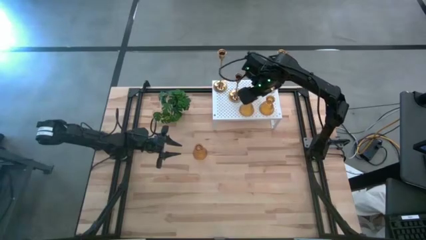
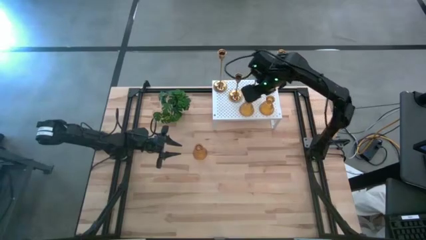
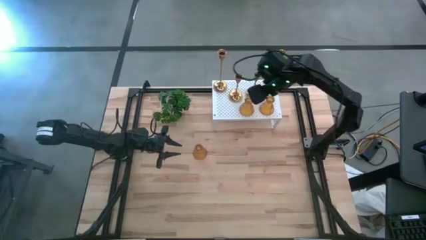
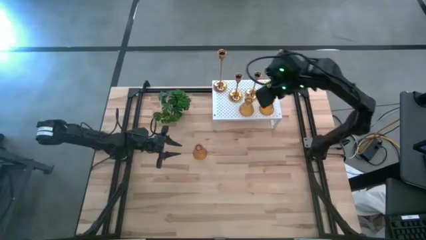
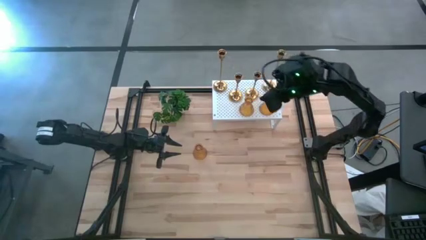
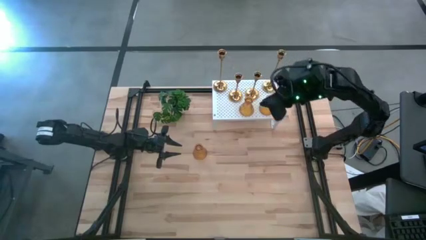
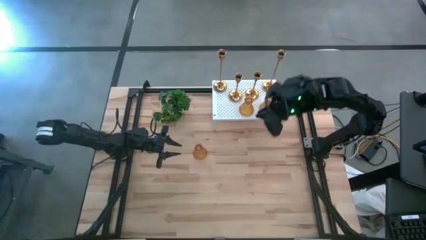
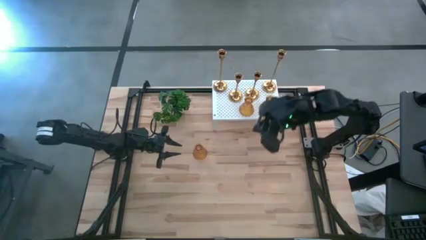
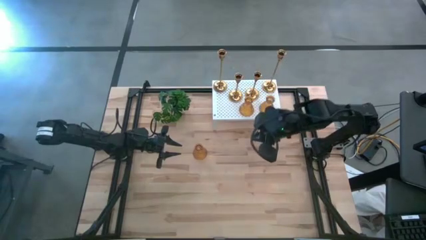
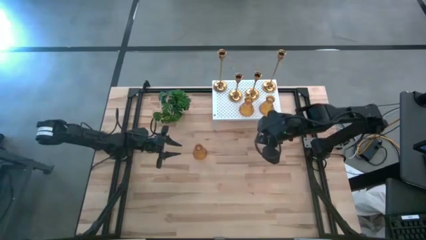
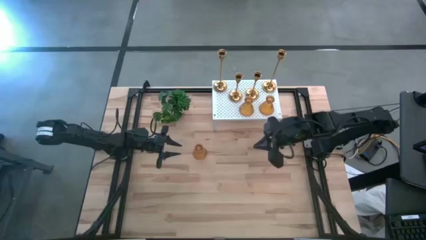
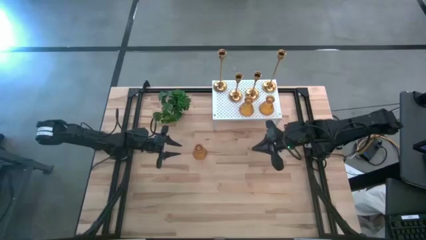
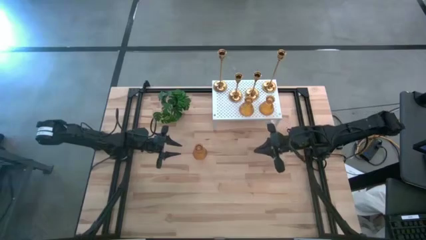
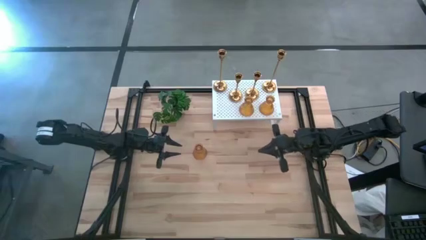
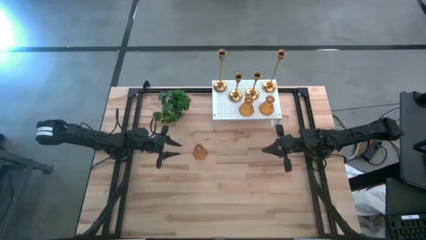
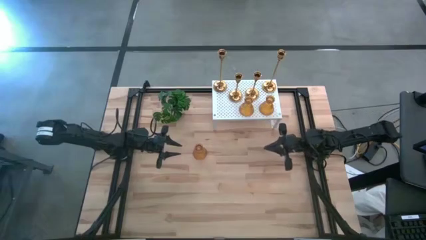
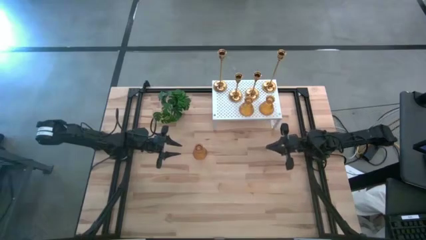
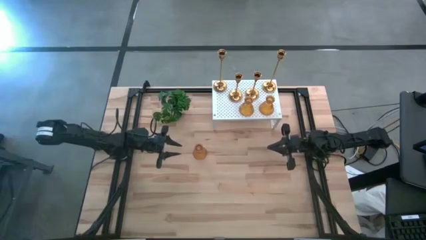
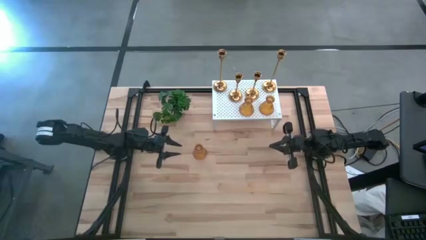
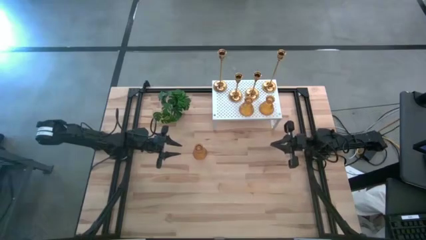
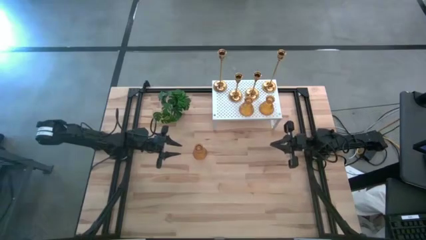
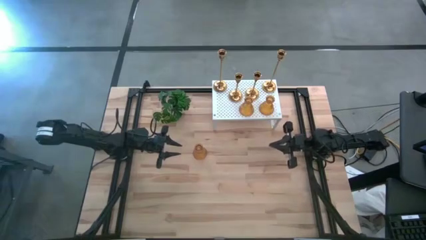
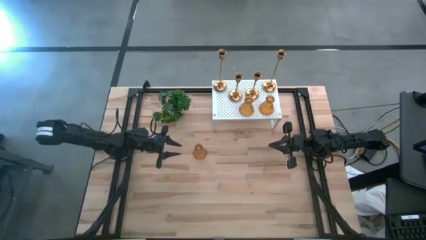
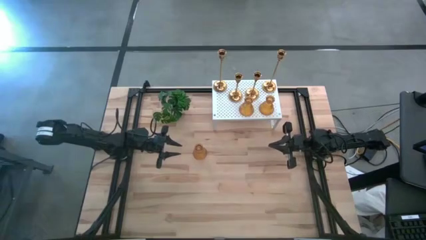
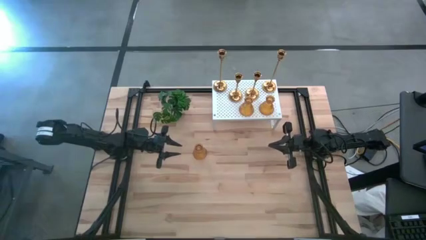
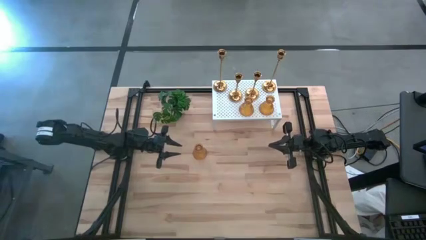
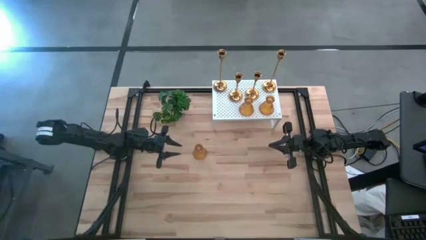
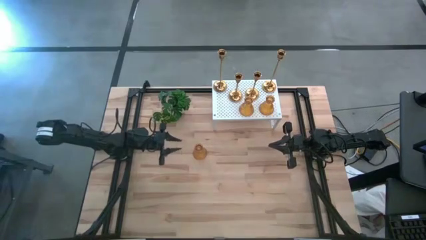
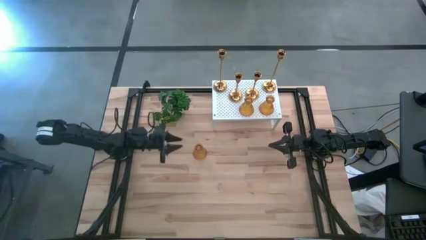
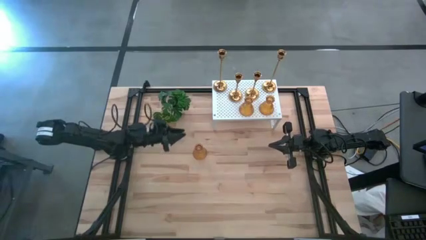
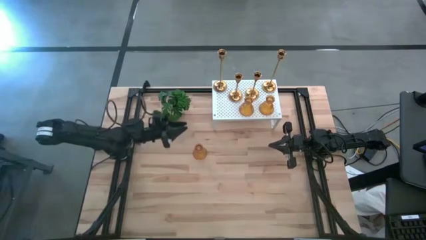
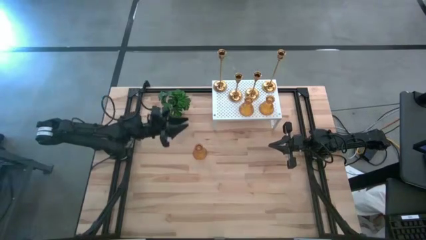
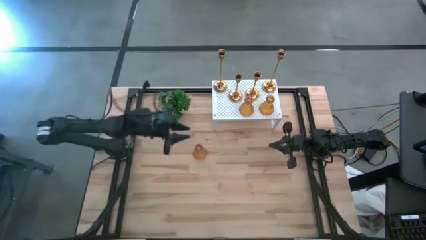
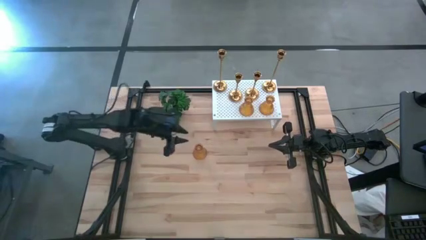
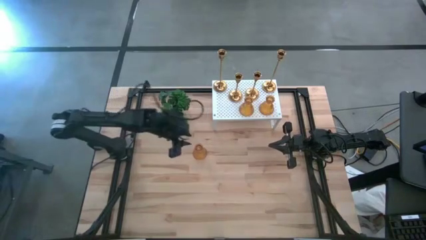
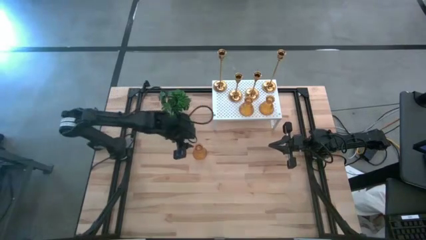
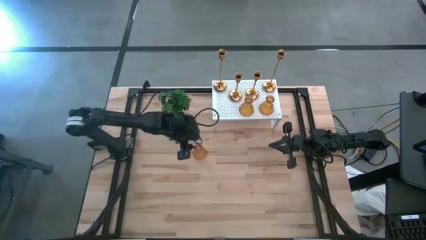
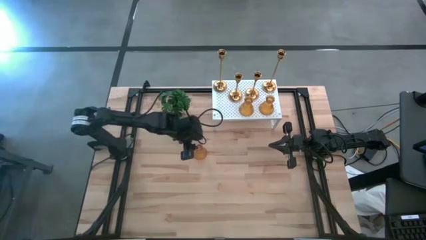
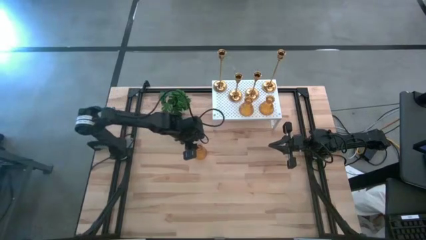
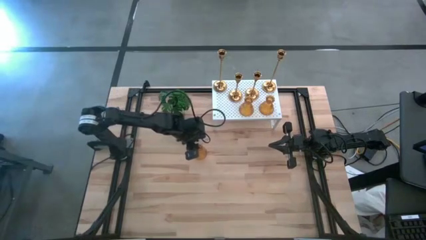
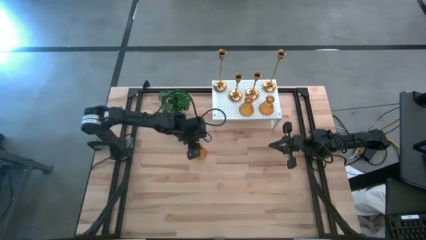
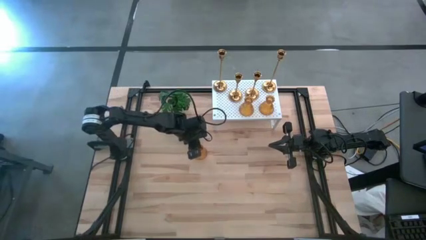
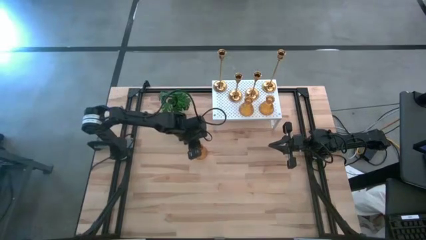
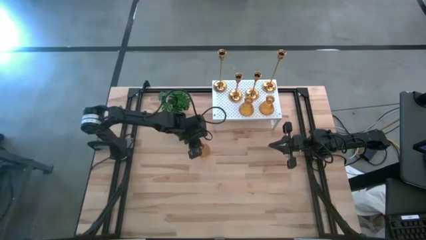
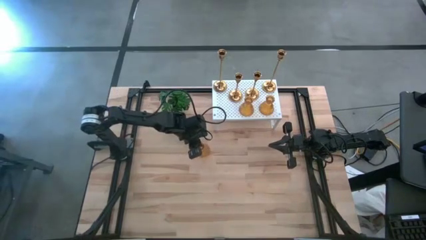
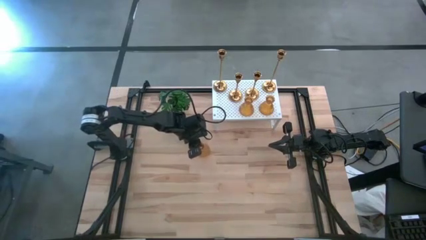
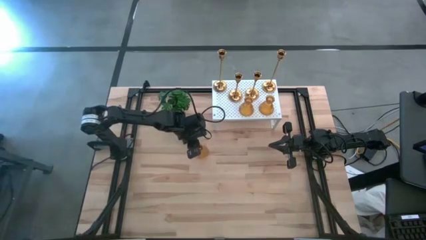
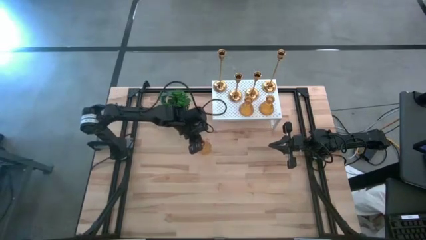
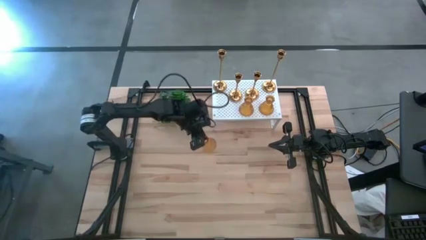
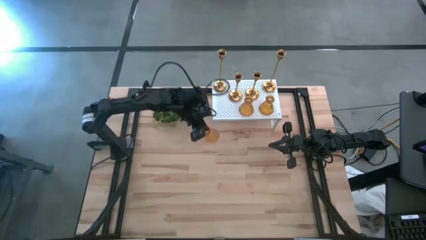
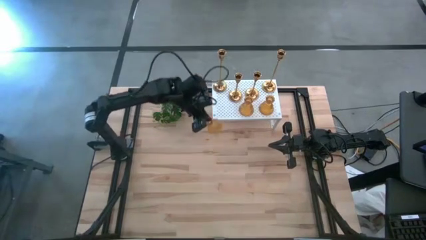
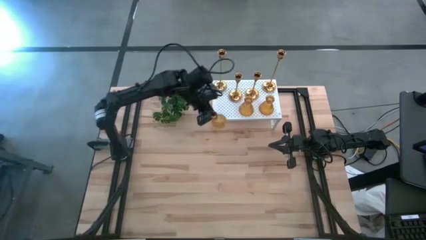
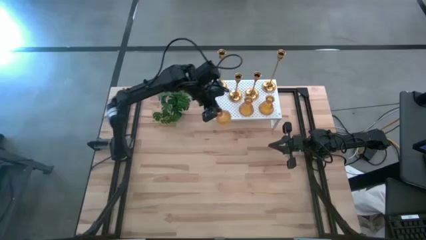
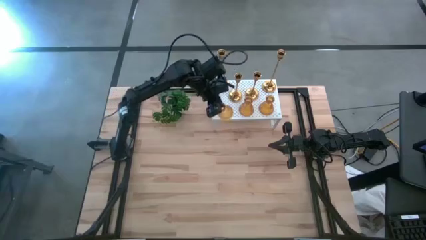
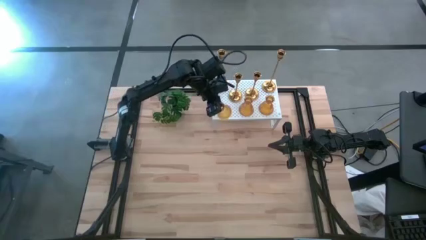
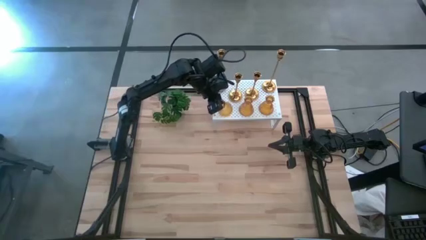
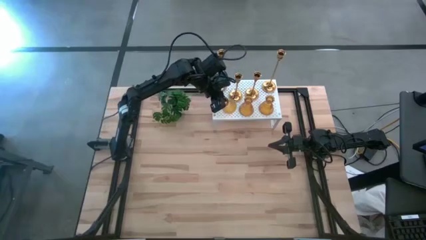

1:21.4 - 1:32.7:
Task: Pick & Place candle stick holders
Put the orange glass candle holder on the shelf

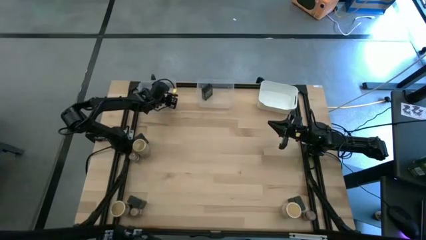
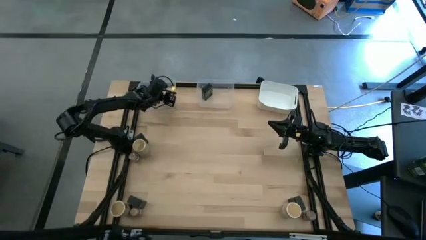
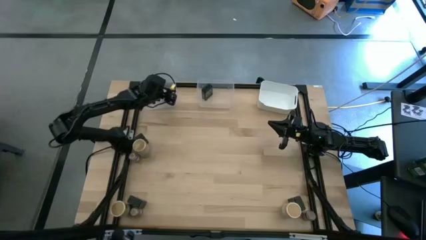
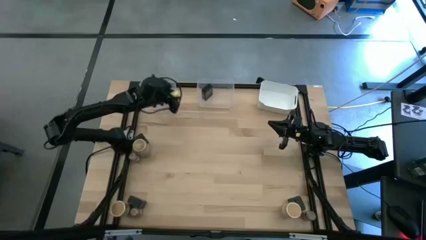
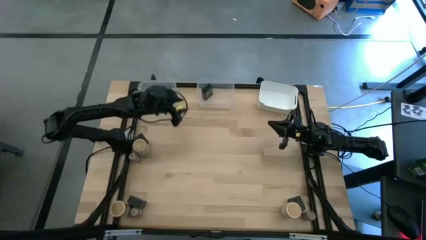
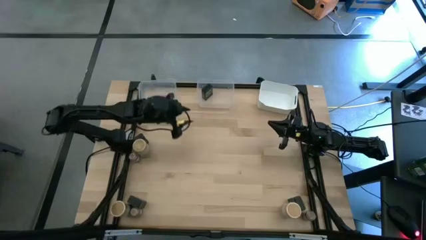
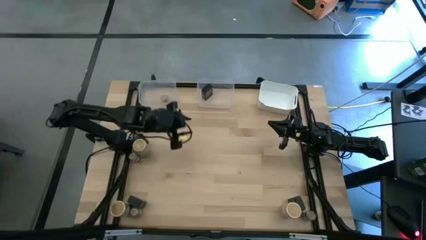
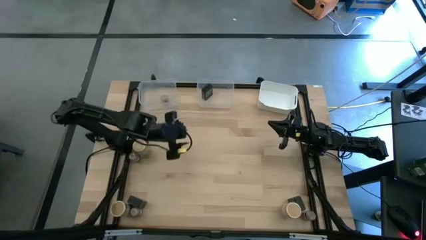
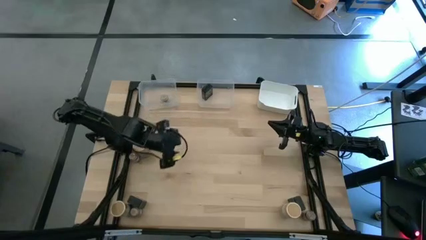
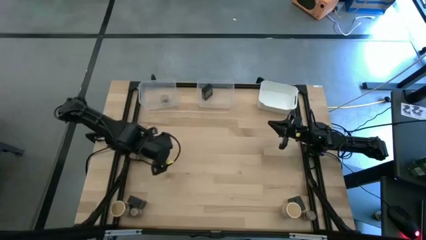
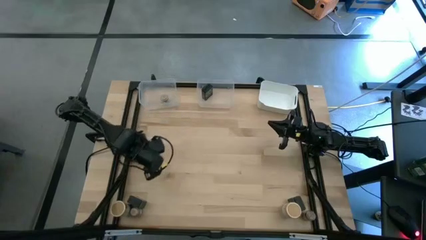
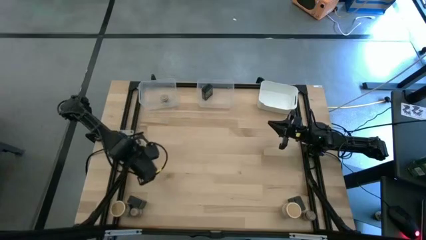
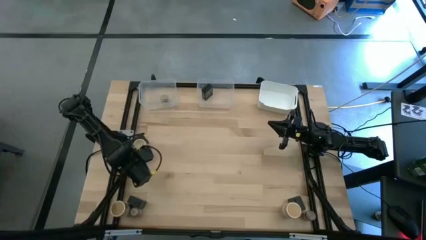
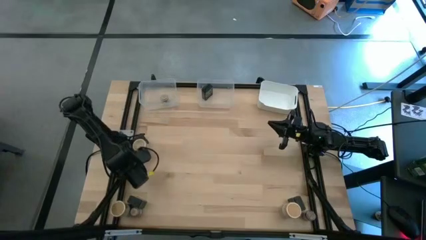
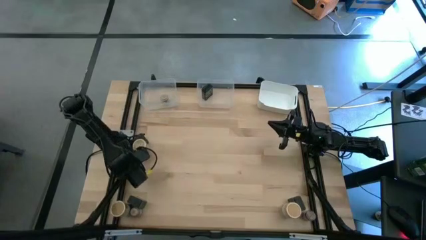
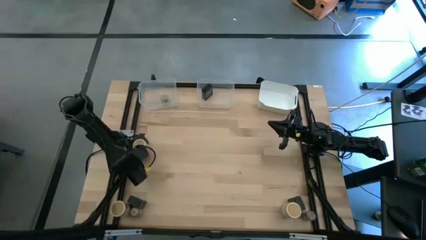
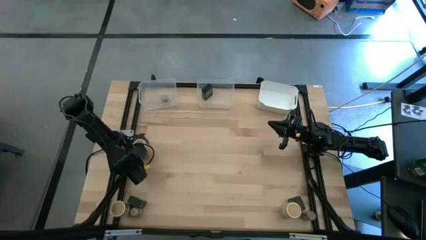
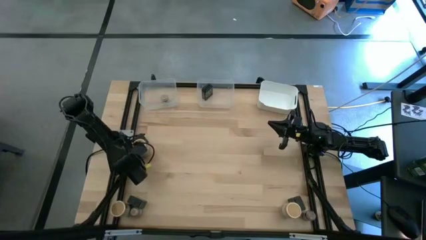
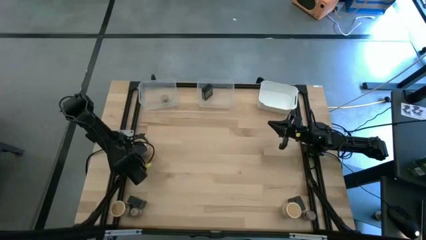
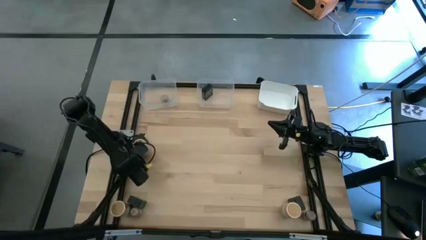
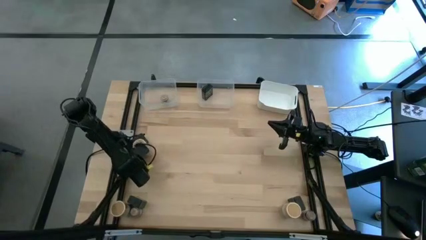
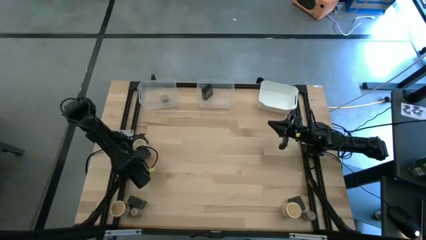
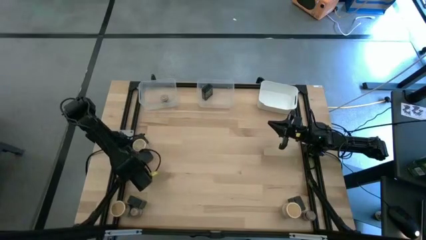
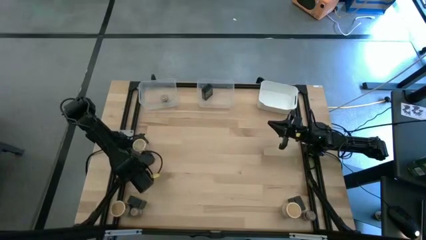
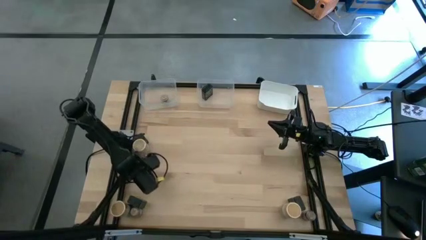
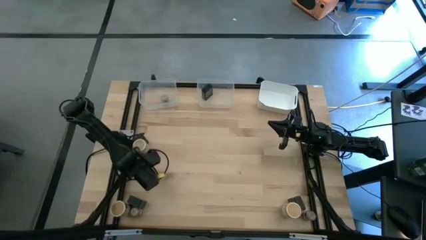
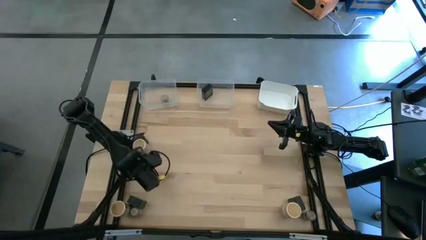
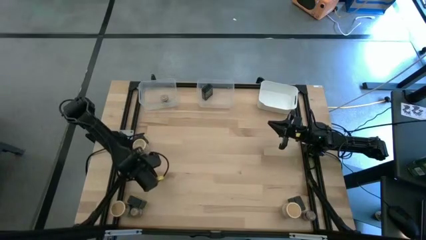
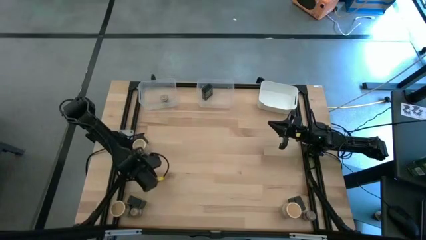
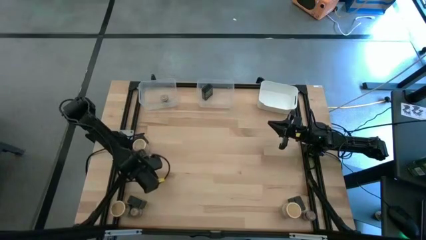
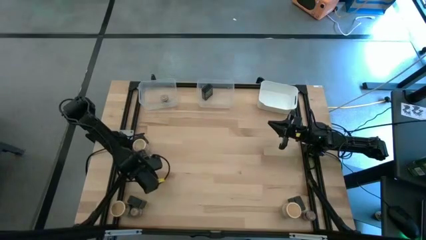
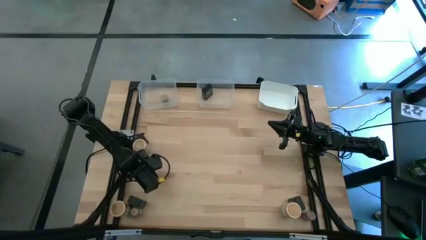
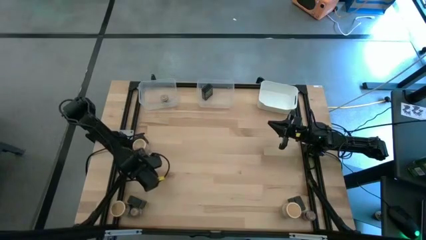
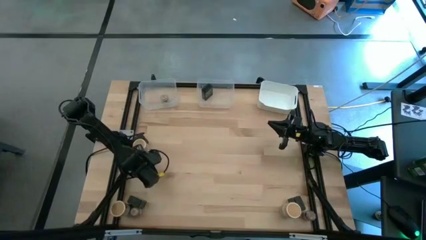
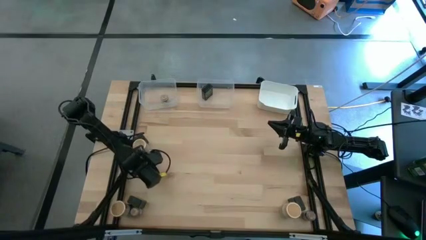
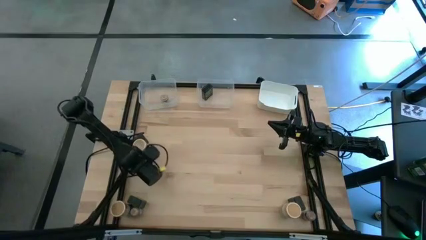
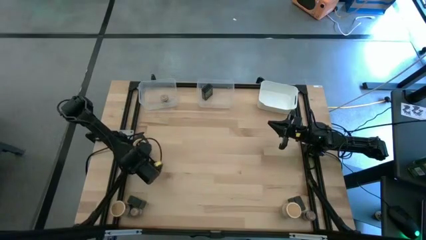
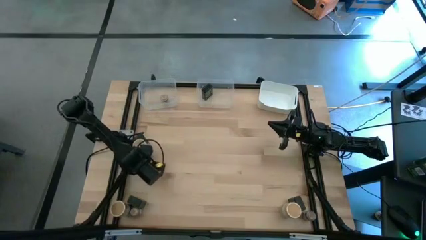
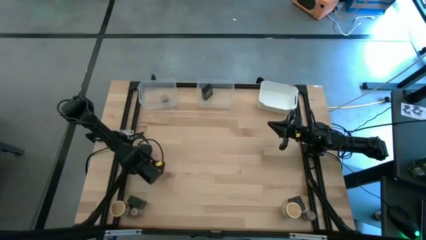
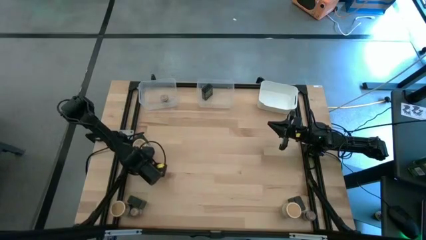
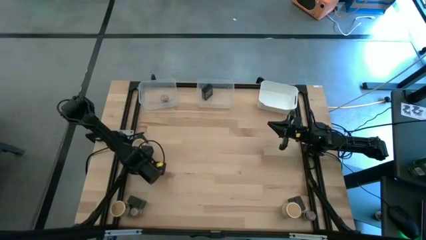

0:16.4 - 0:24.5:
Task: Sort spices by type
Put the top left brown seasoning bottle into the left transparent bin
